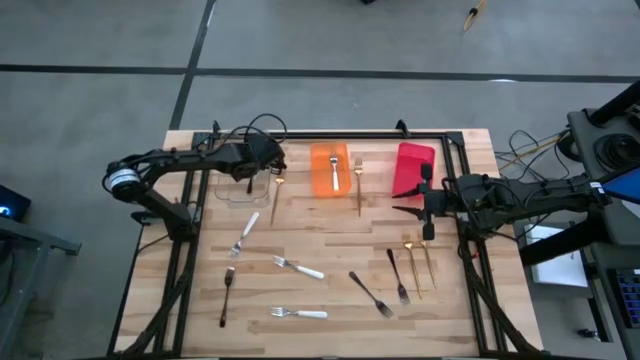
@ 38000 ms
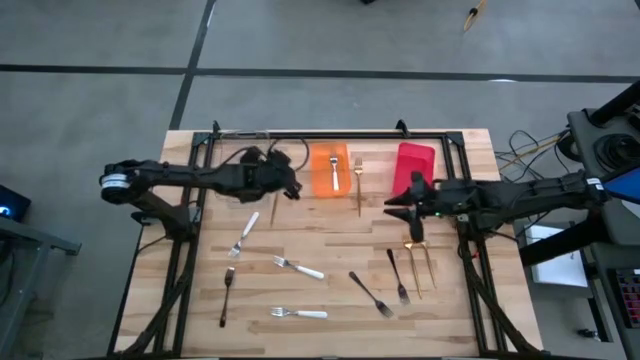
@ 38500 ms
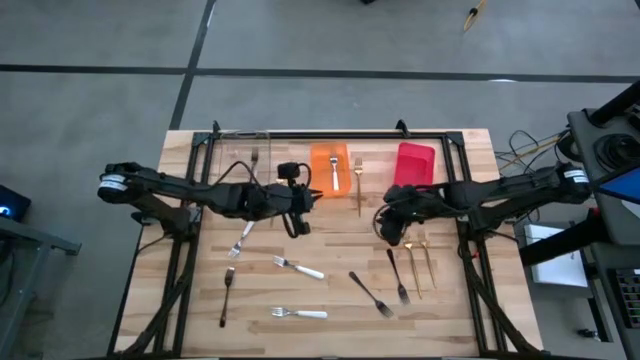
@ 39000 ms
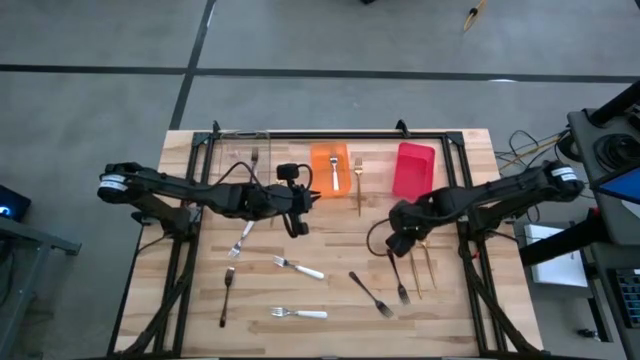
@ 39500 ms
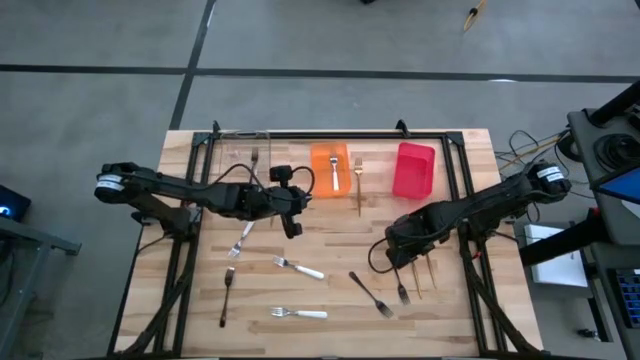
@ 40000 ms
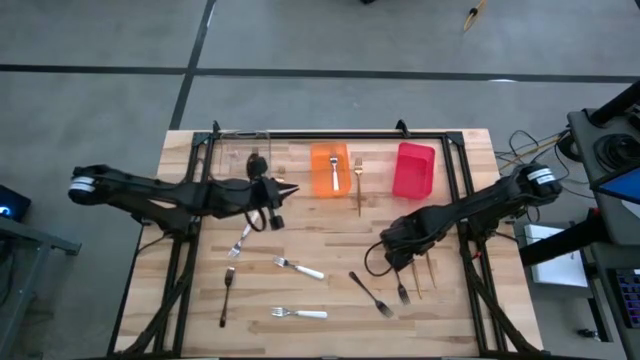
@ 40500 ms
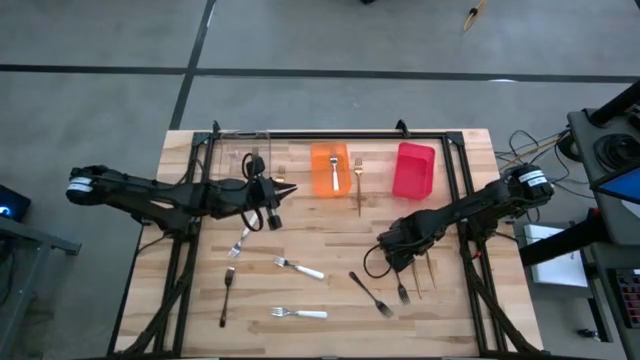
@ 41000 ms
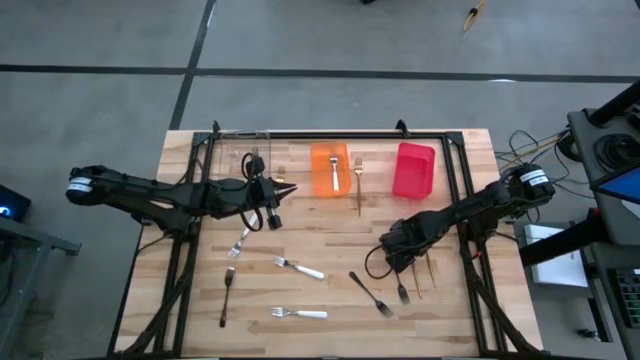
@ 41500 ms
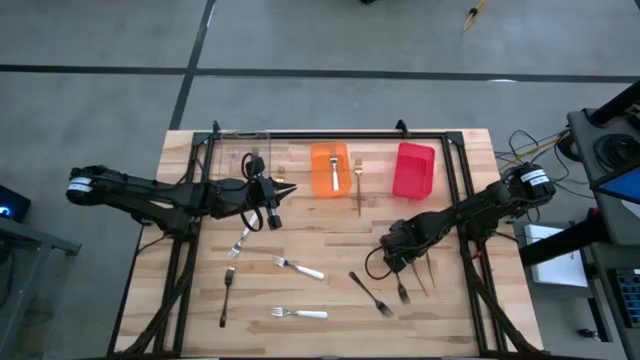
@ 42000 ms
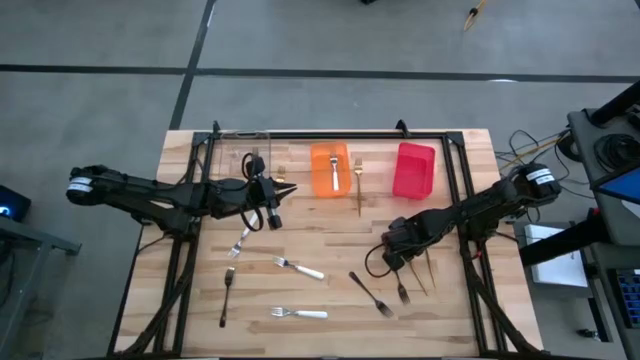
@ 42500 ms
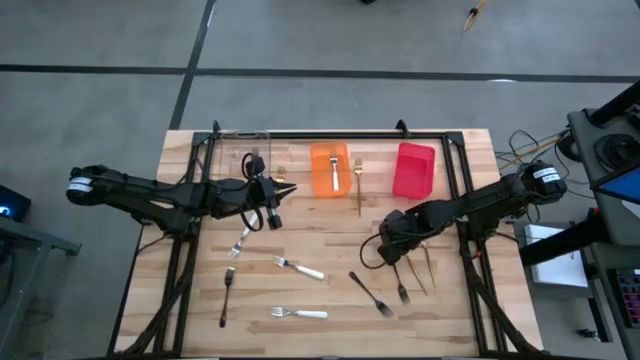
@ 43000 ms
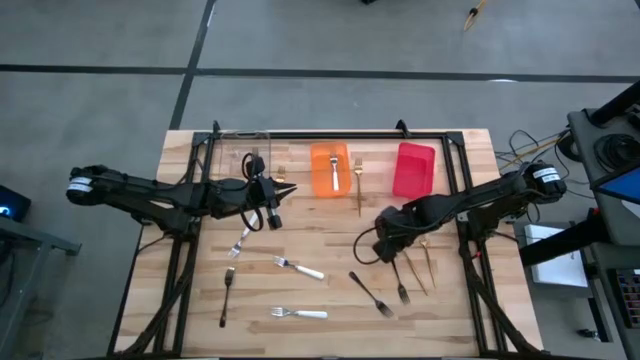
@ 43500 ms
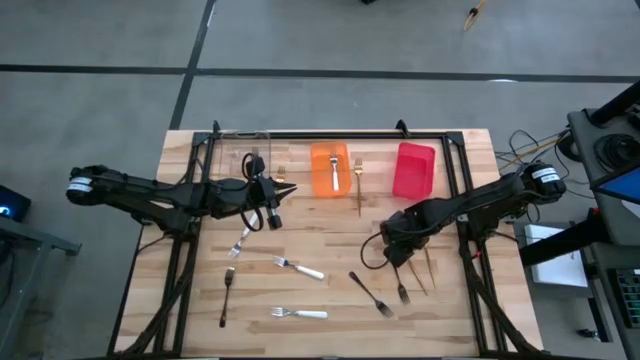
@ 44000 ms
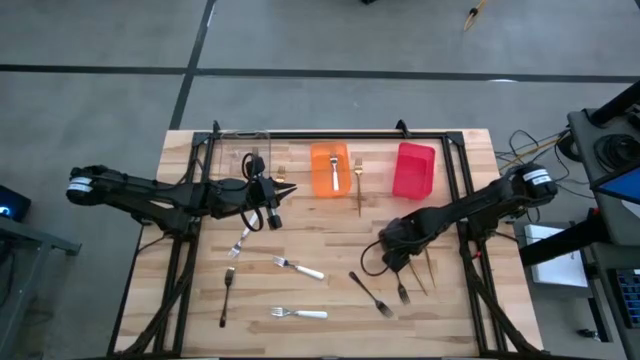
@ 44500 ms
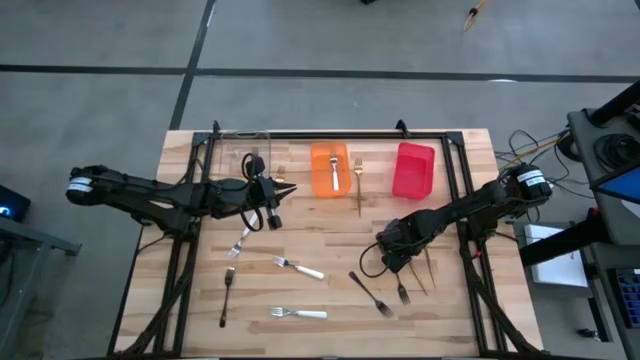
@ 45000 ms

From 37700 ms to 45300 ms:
Task: Sort silverware by color (type)
Put the middle right gold fork into the red bin

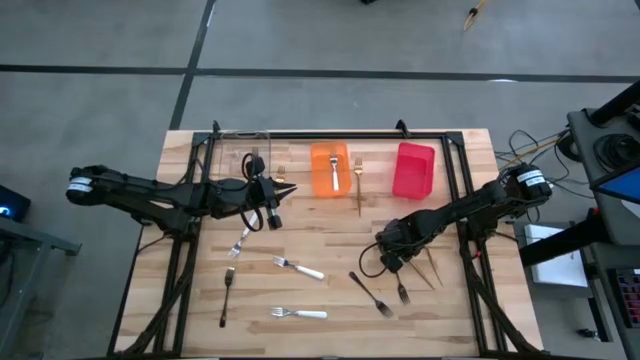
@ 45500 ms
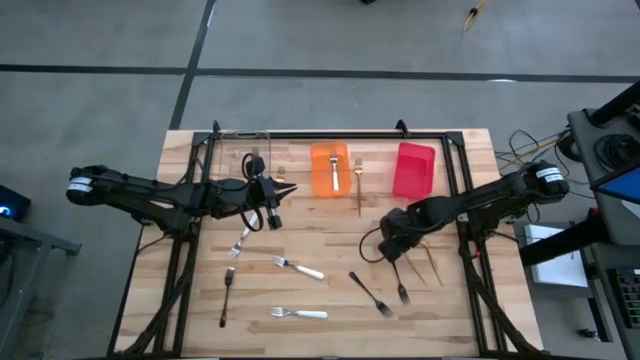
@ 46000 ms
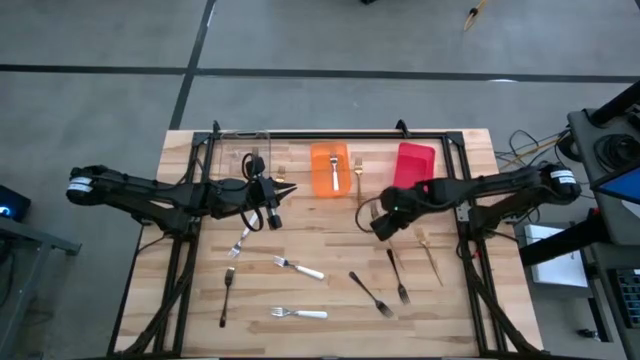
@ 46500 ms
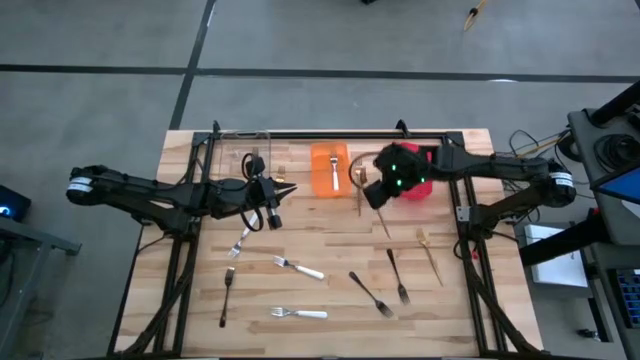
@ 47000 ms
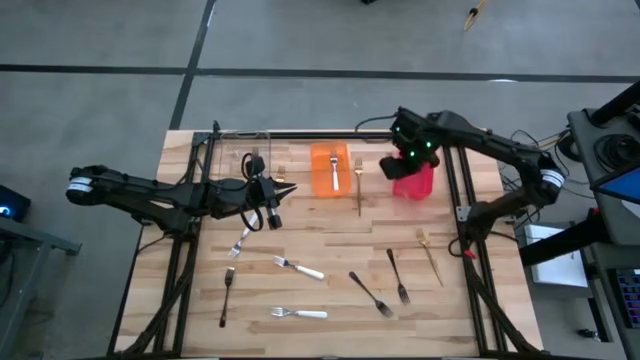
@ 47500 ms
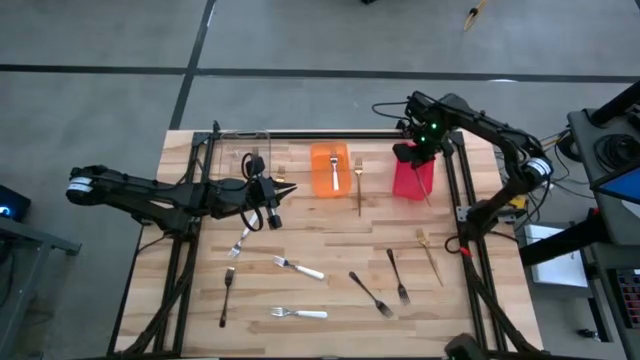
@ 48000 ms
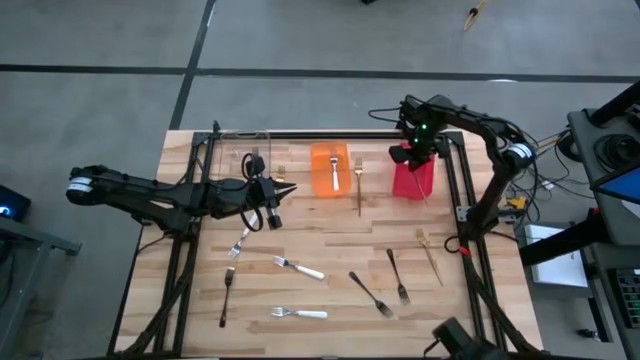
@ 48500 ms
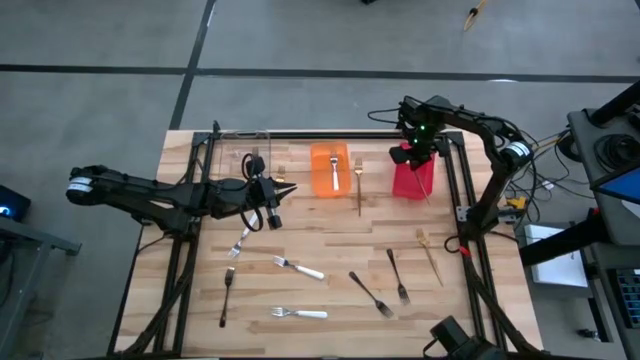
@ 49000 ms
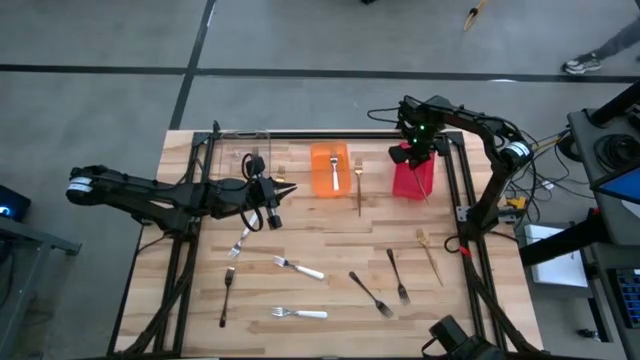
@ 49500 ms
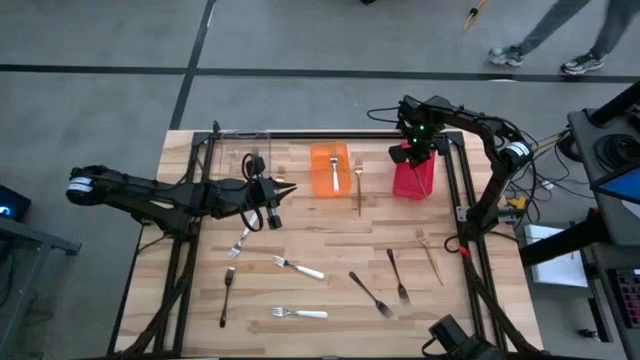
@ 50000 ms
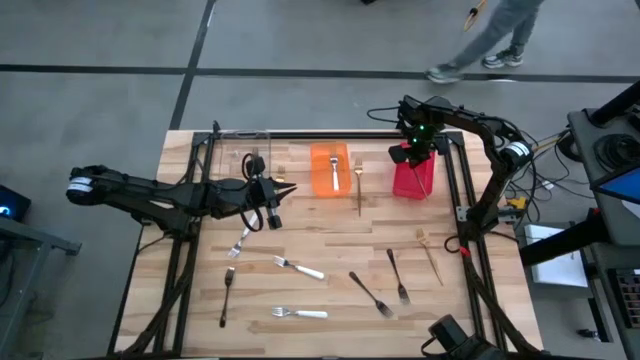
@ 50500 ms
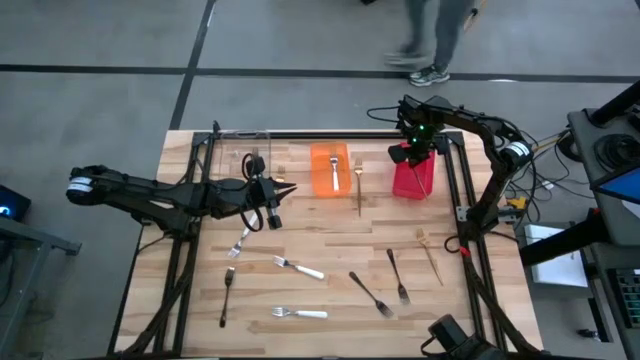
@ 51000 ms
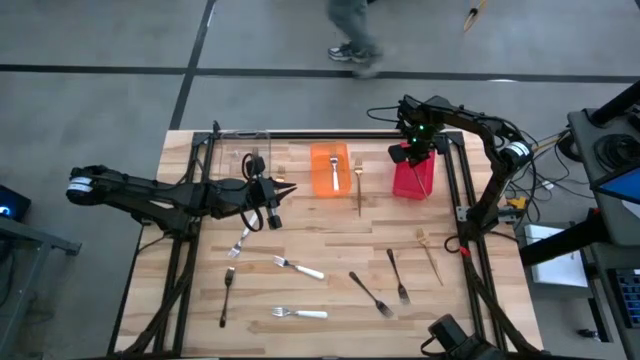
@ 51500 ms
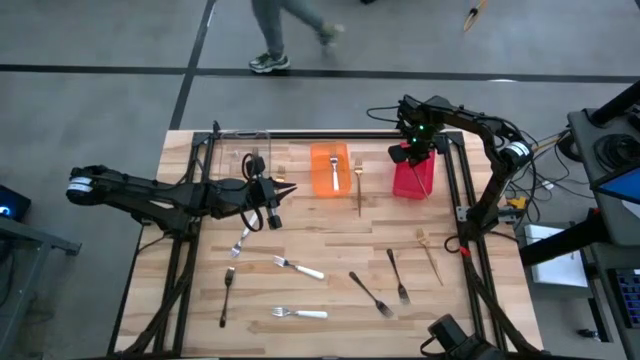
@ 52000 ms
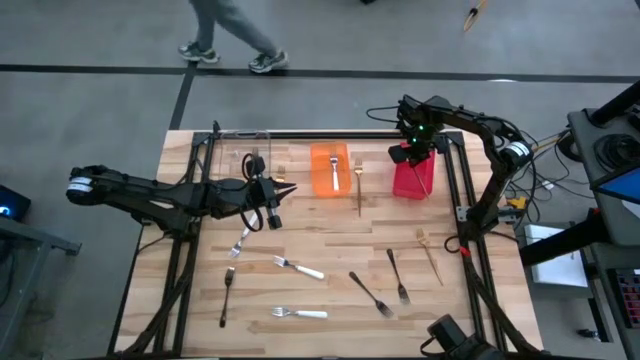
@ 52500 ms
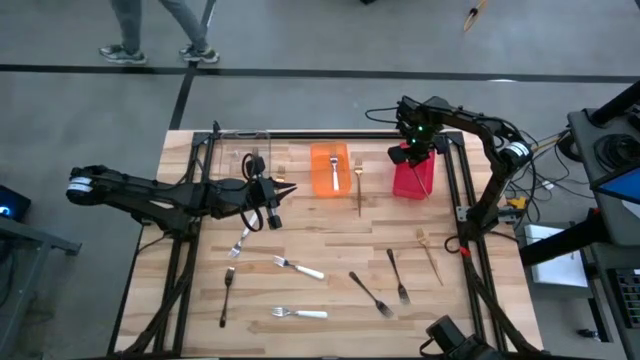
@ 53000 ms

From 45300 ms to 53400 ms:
Put the middle right gold fork into the red bin
